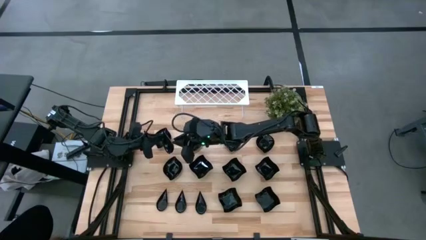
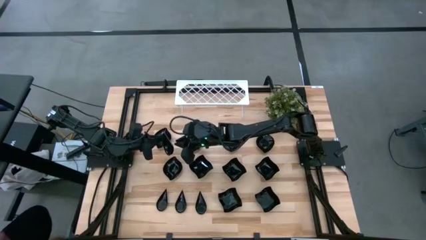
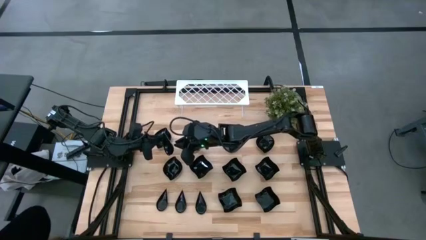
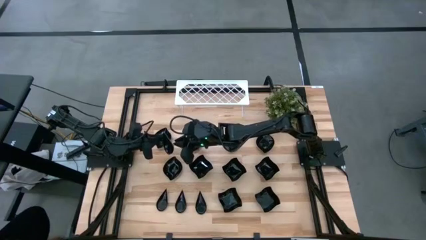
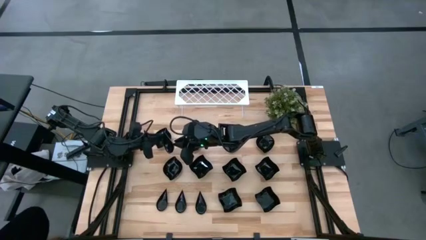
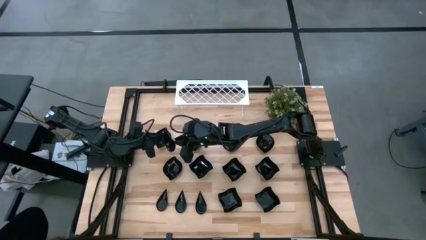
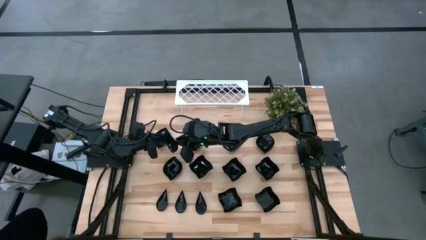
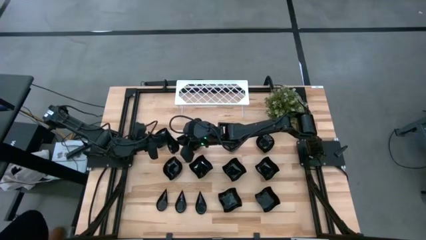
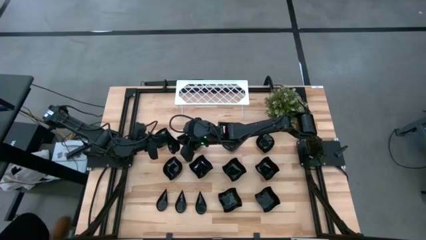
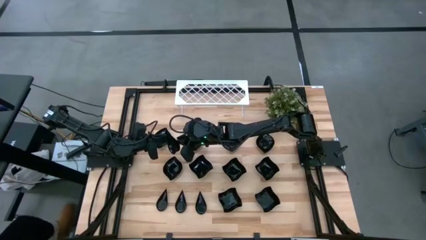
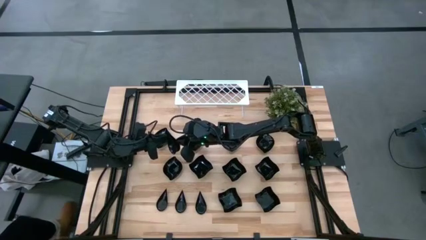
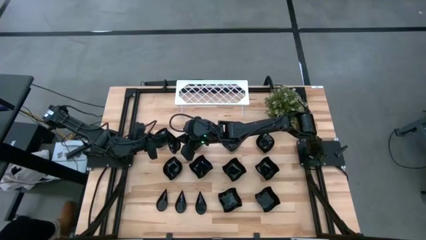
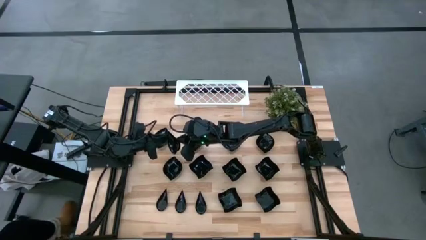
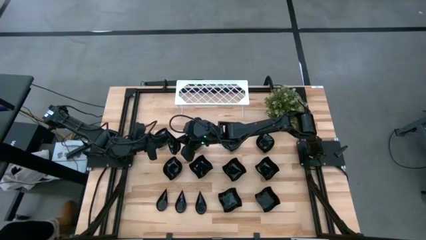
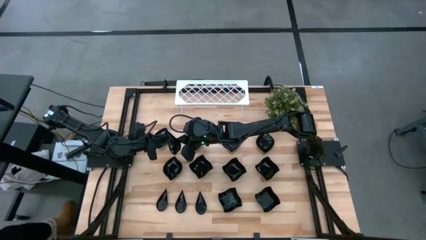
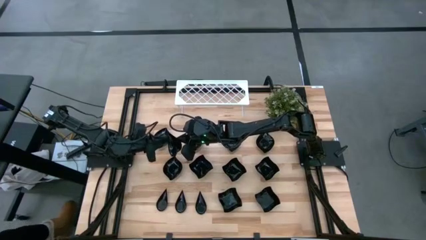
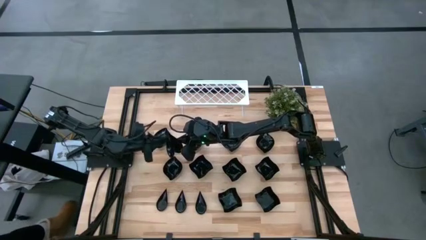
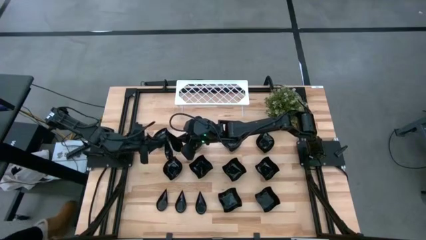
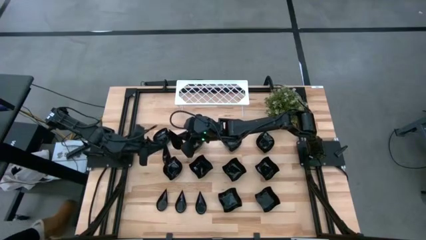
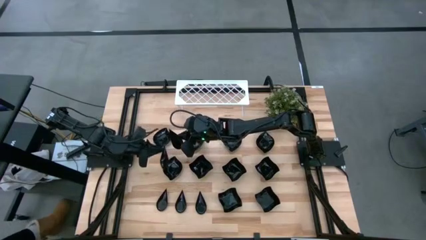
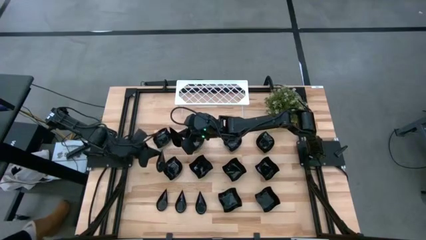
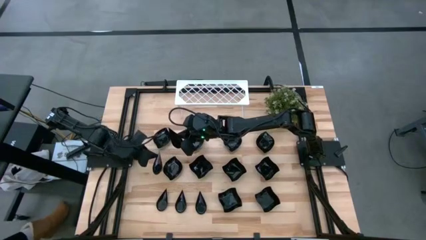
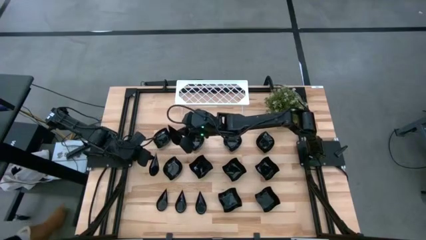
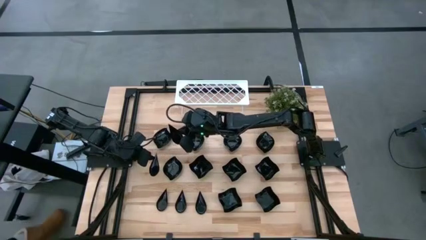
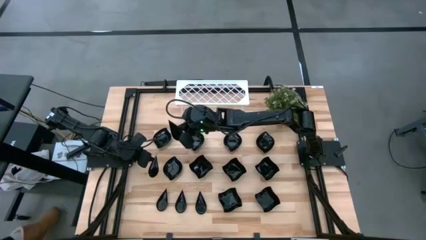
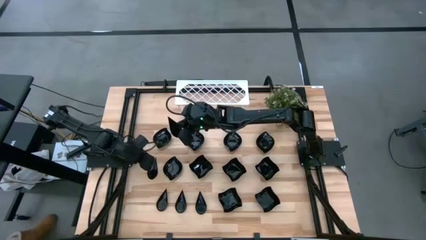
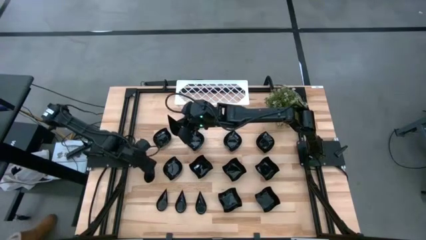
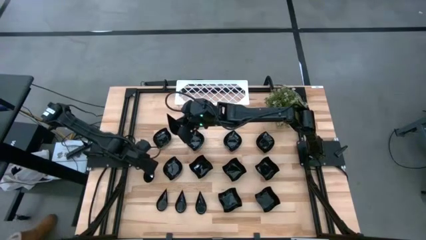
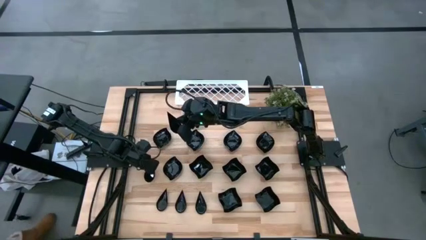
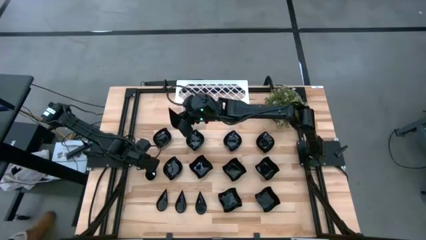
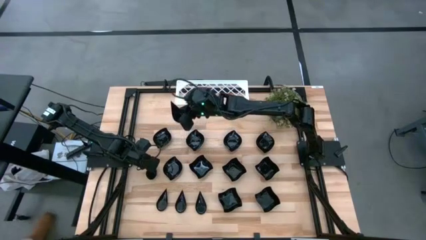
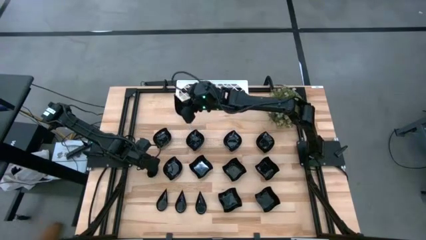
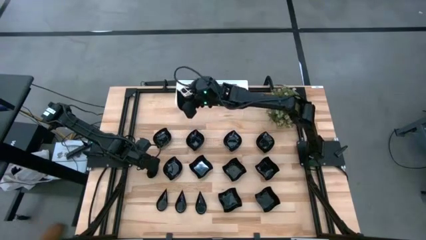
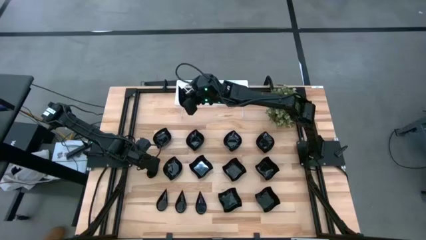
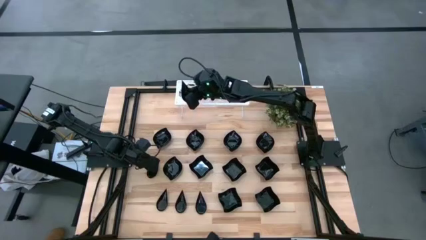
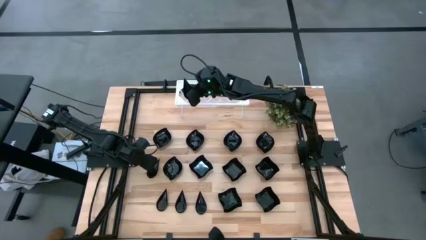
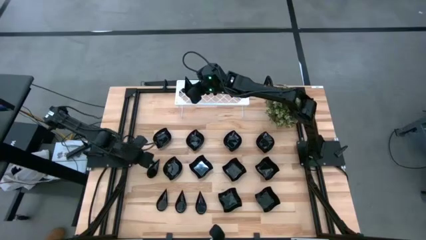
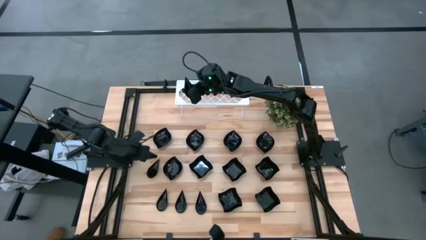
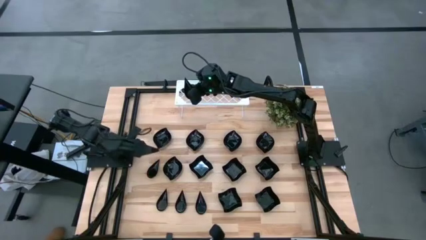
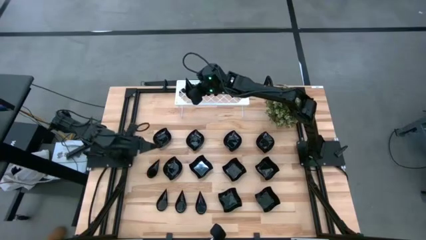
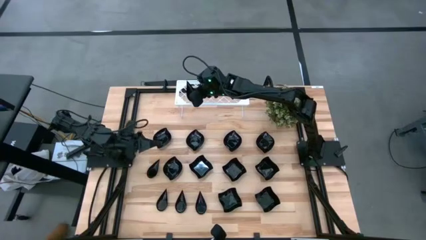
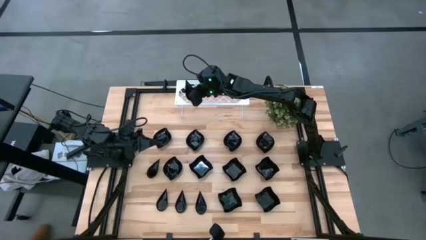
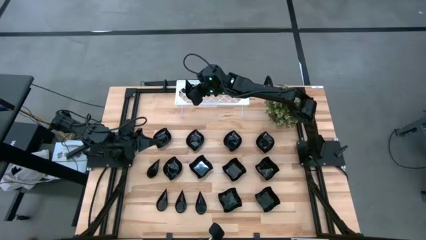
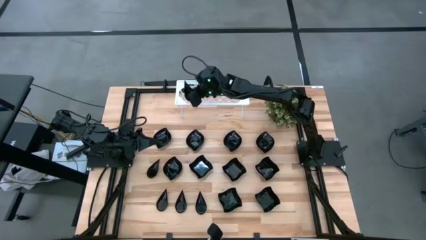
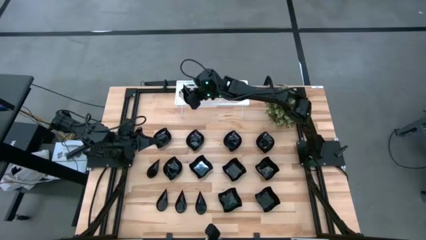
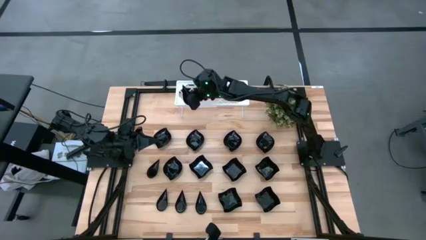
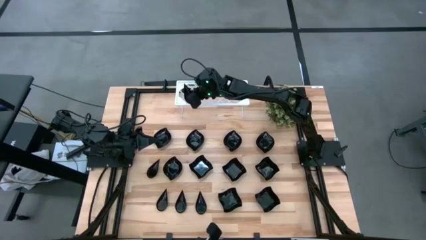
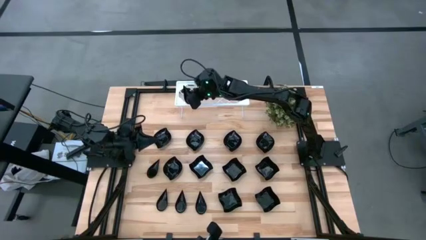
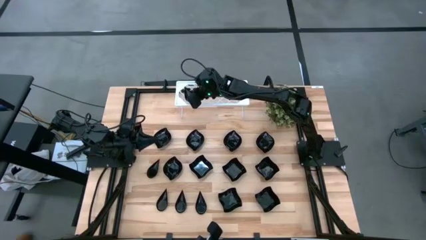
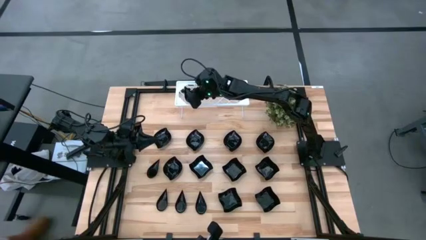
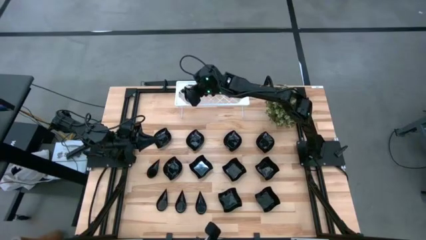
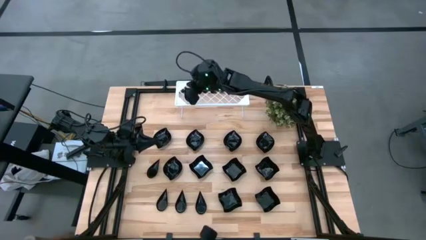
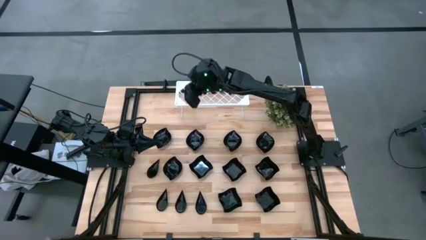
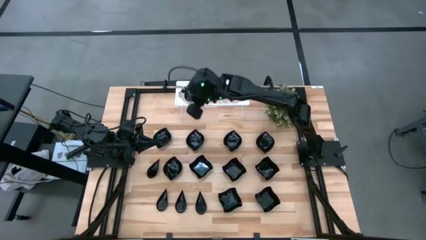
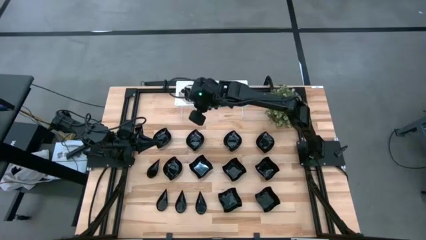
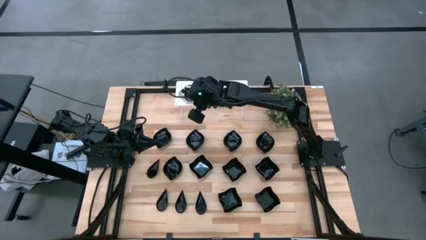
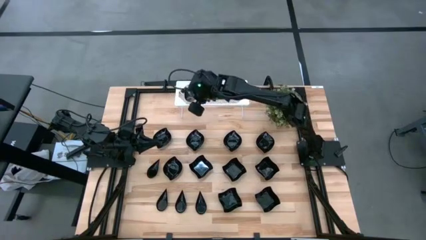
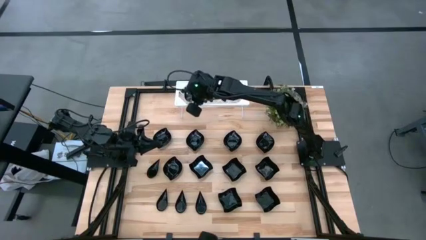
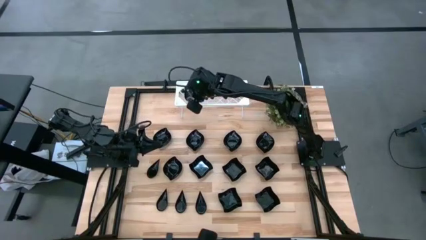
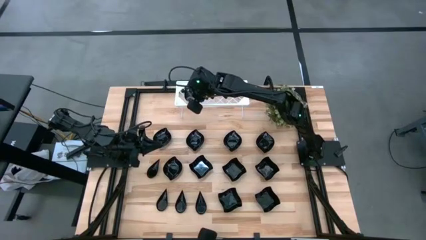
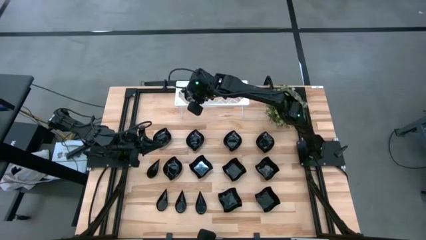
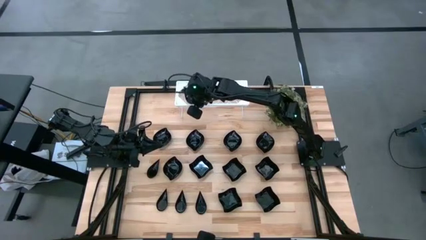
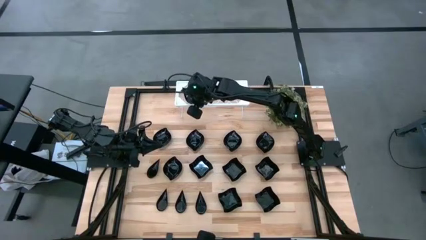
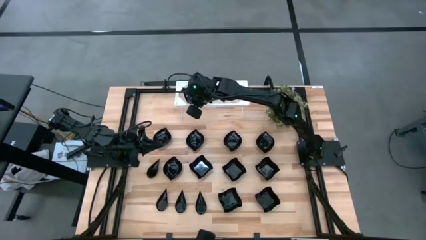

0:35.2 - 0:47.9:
Task: Pick & Place Mini shaped plates
Put the black drop shaped plate on the shelf

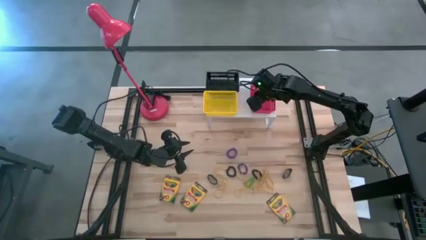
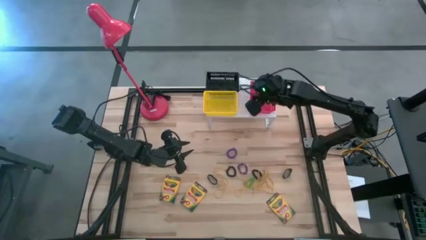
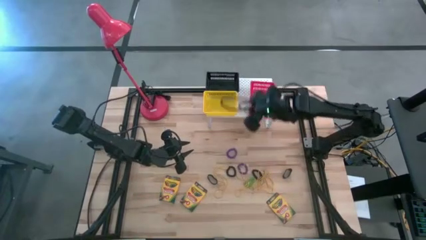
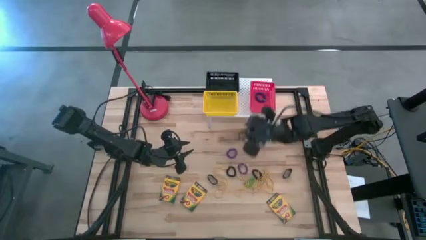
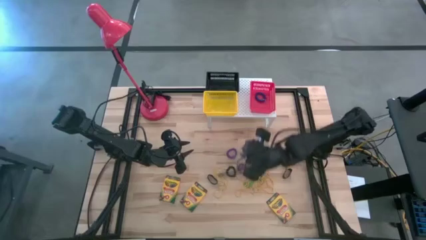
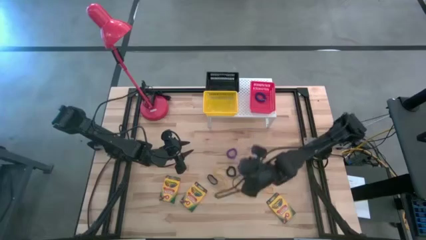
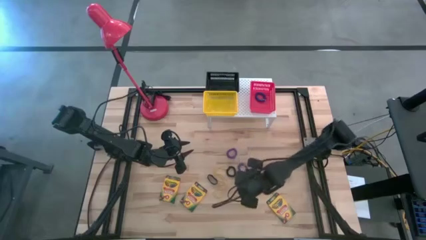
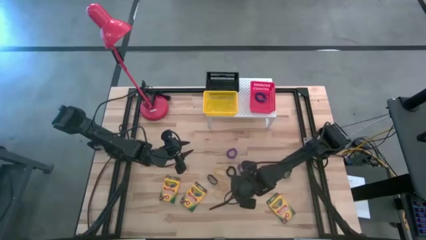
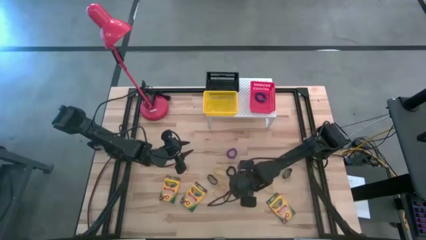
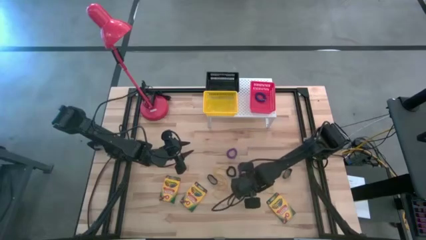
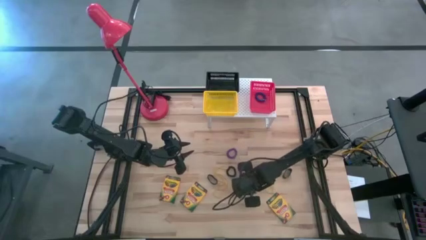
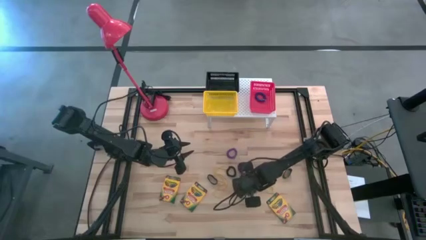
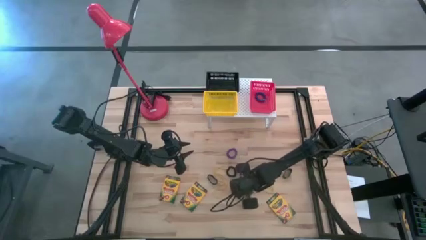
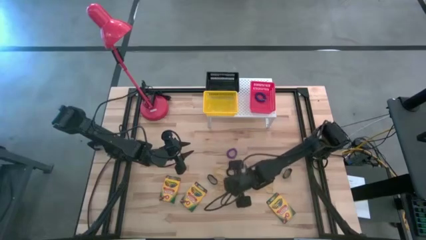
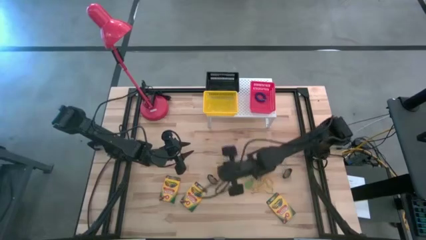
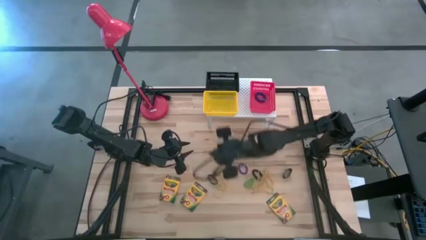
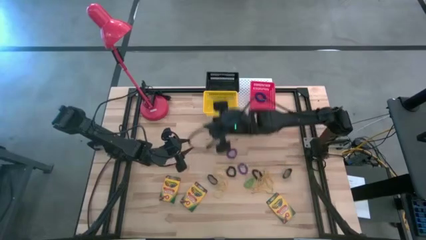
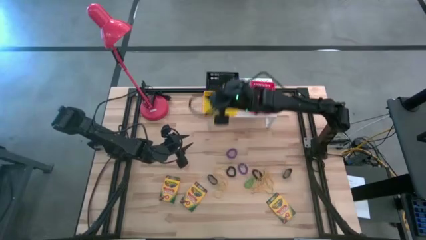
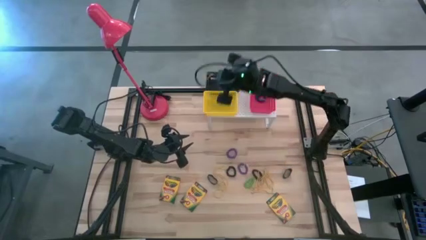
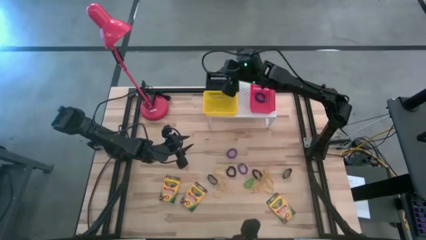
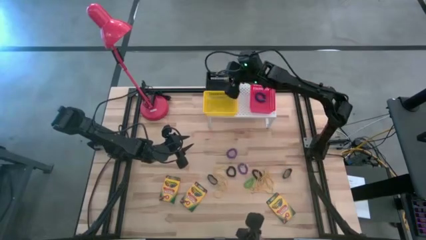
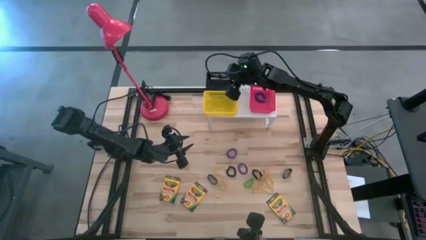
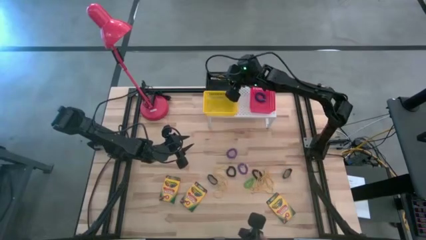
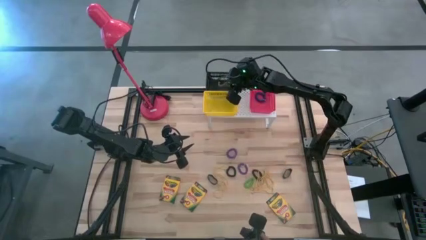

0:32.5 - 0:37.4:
Task: Pick & Place Office Desk Supplies
Put the yellow rubber band into the black bin on the shelf
